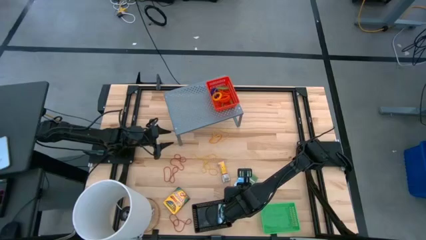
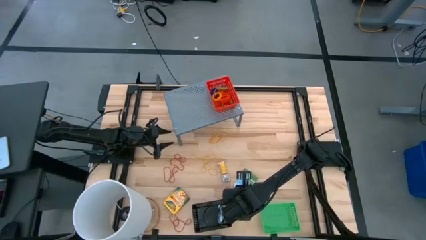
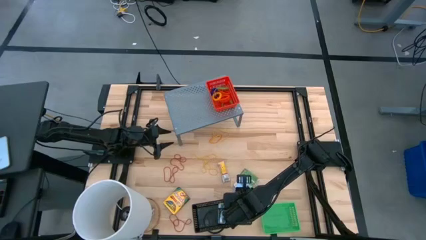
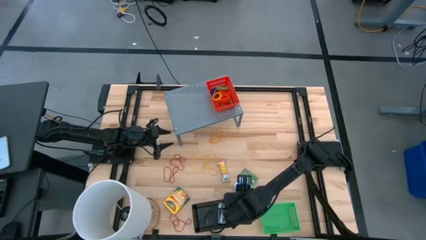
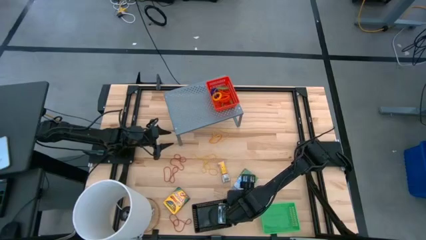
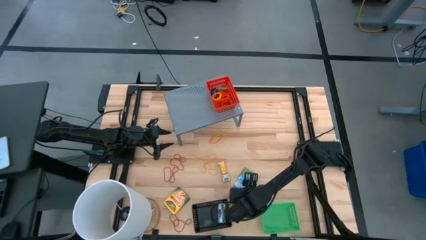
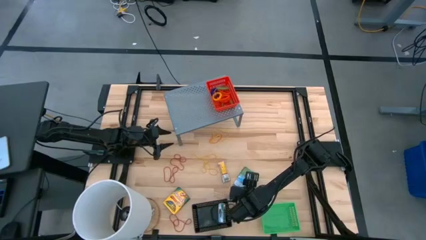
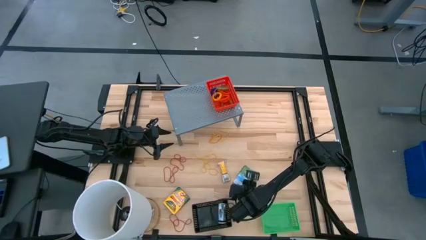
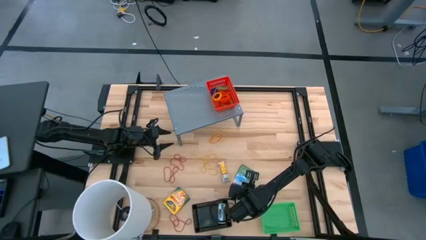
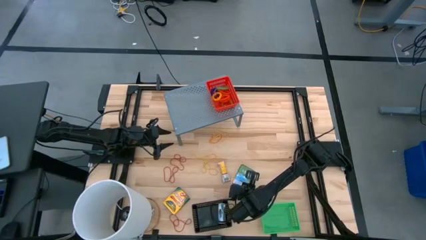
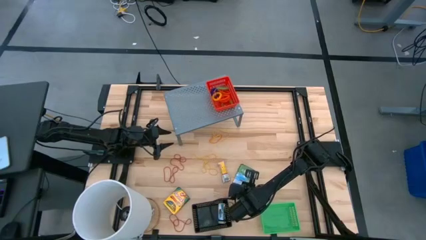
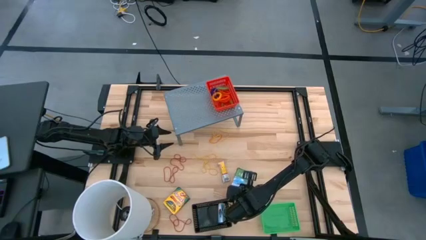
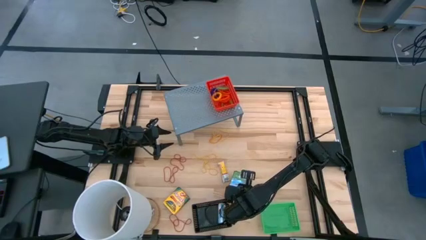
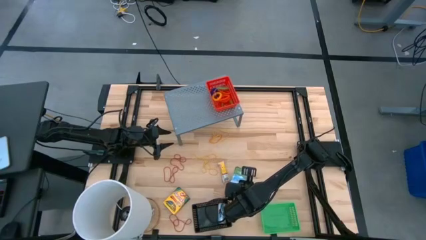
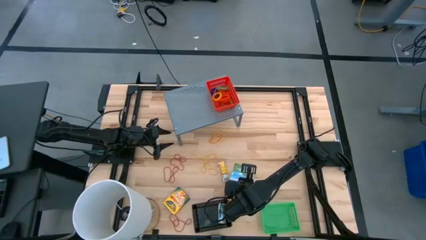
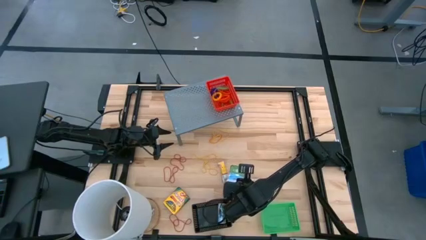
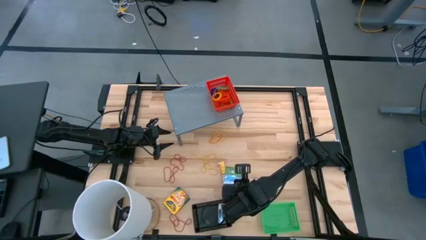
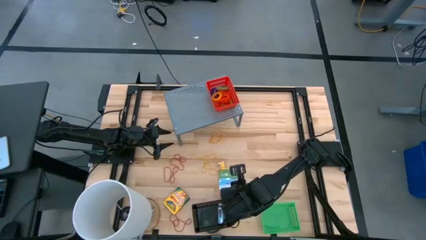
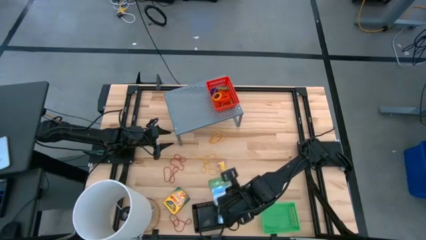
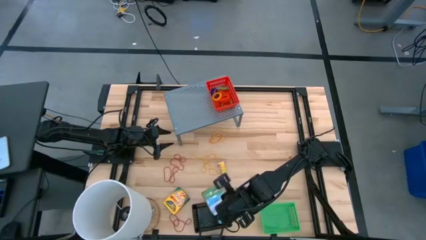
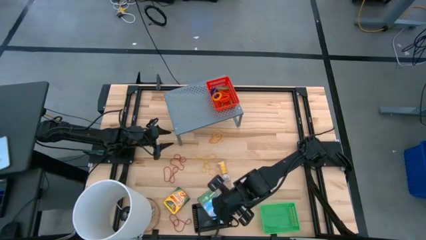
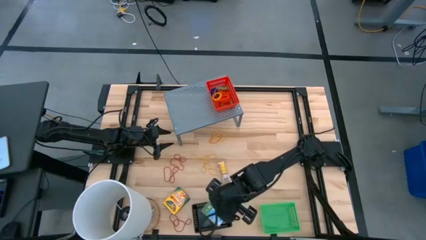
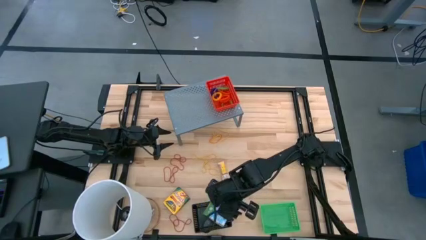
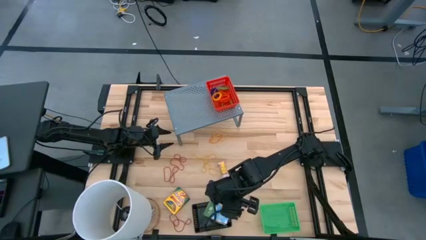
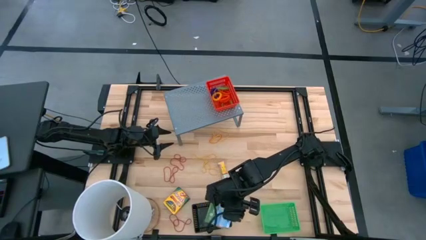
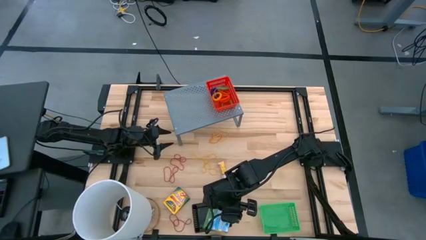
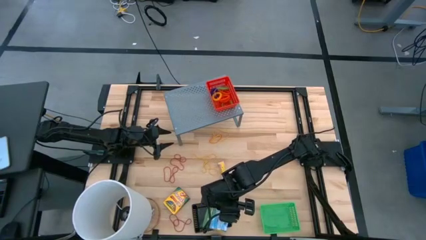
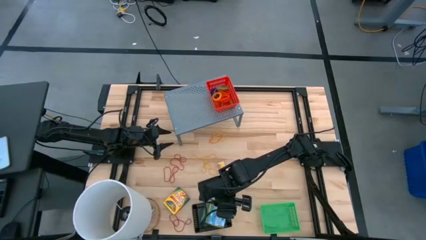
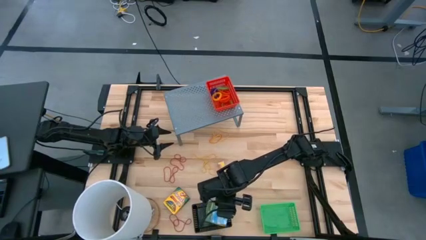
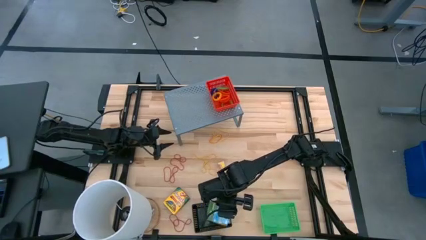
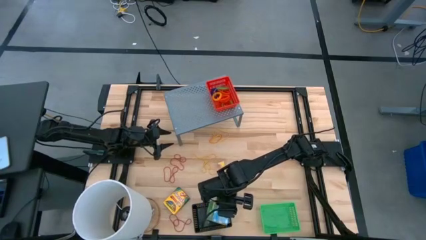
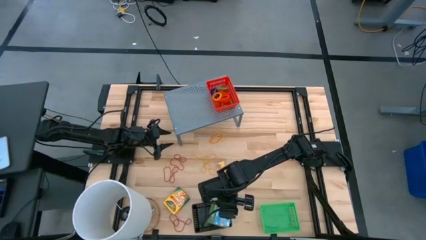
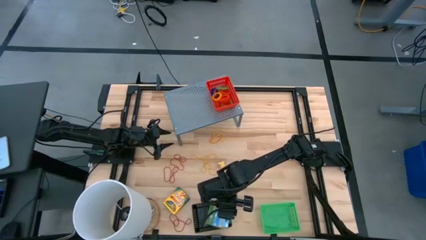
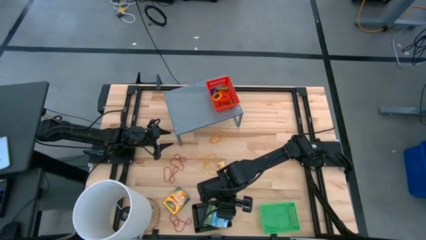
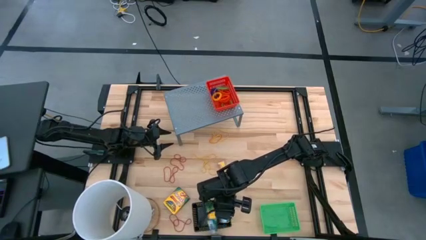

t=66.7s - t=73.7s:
Task: Pick & Place Office Desk Supplies
Put the right yellow crayon box into the black bin

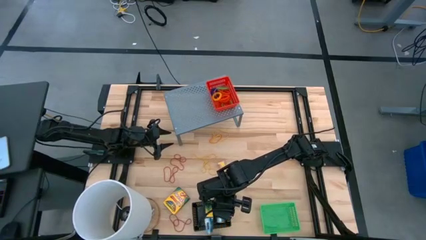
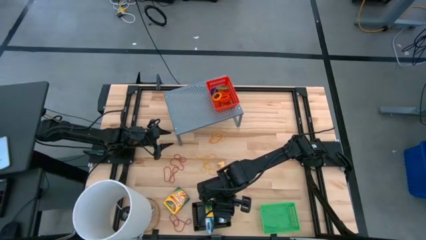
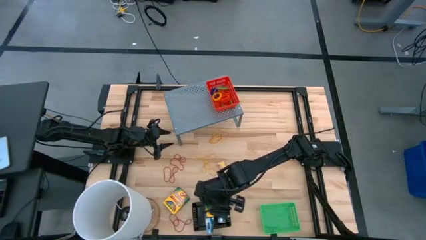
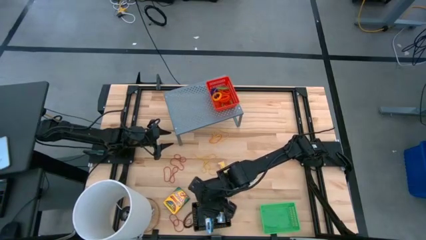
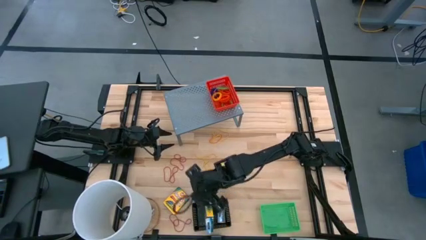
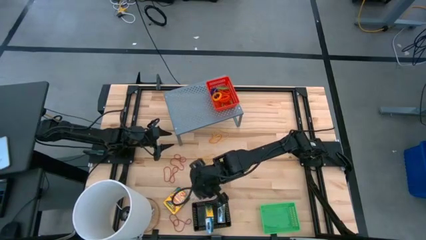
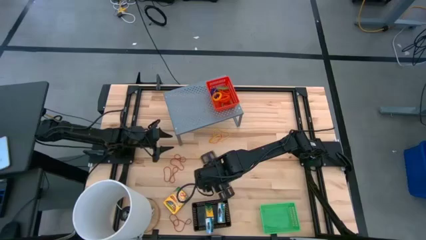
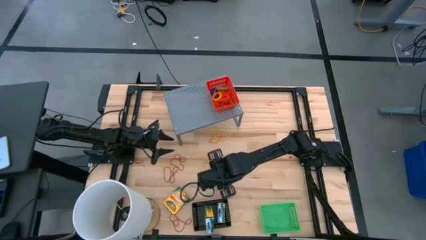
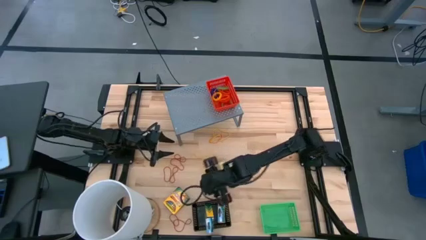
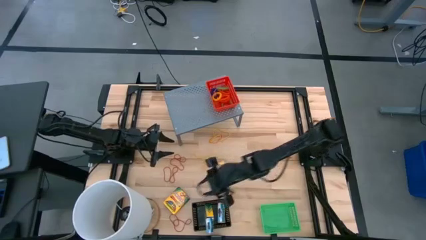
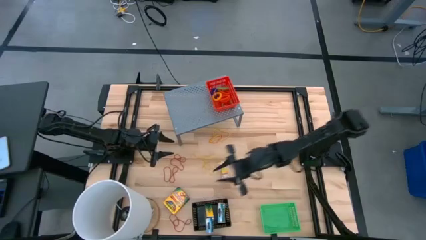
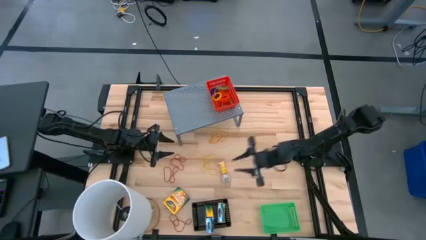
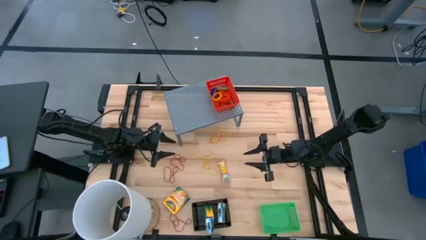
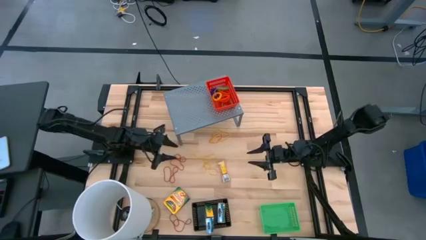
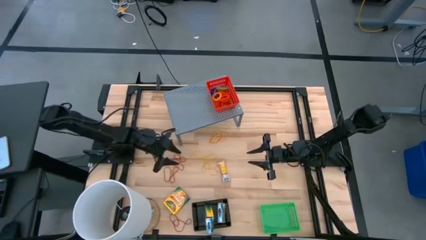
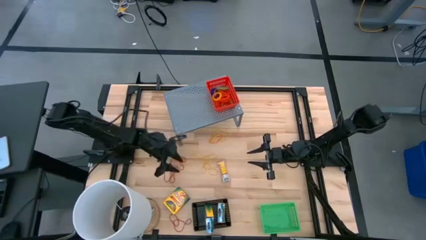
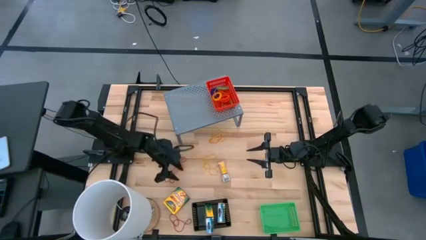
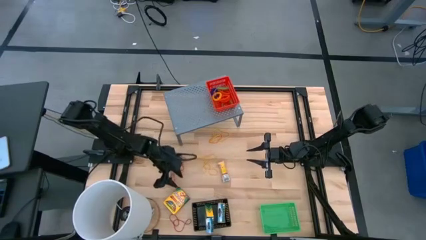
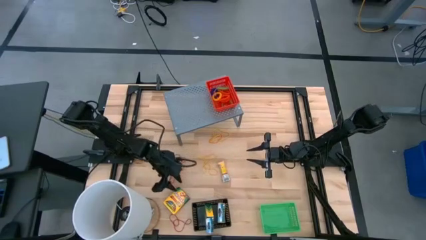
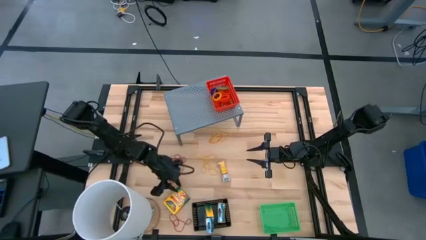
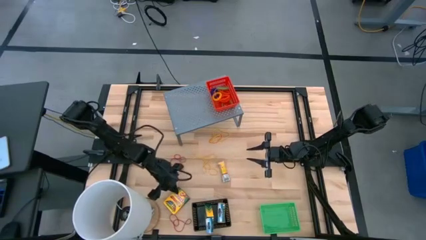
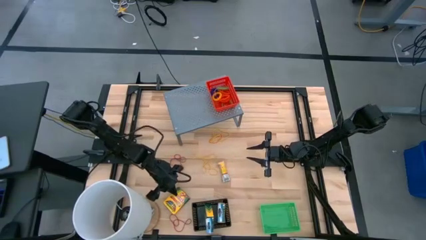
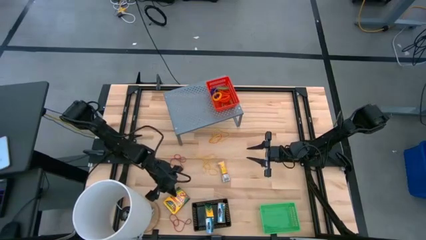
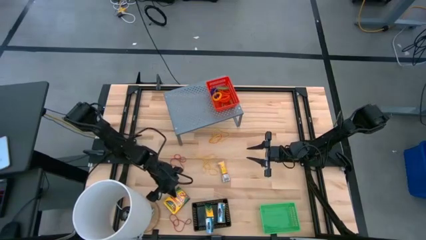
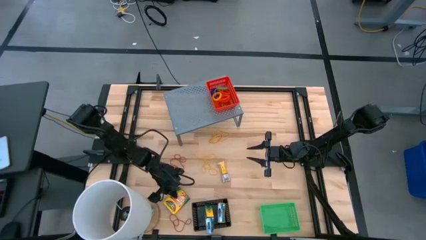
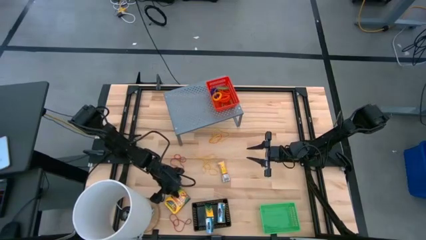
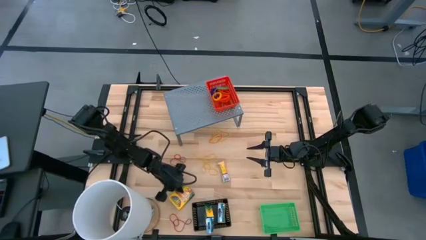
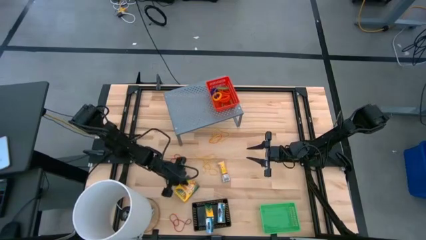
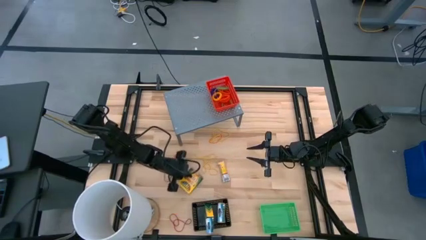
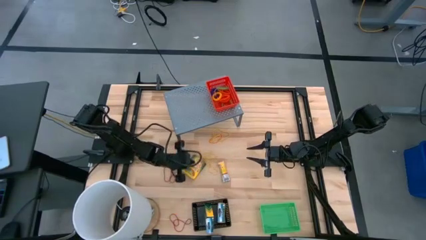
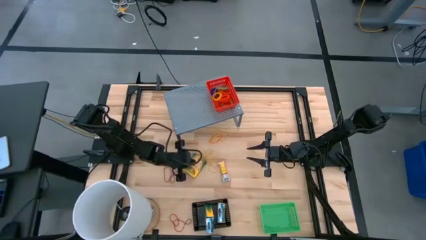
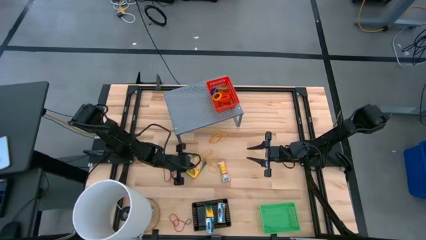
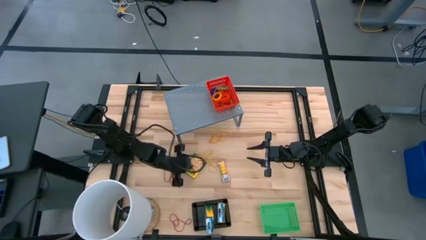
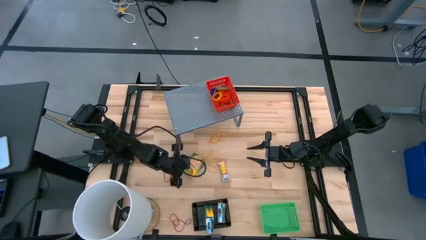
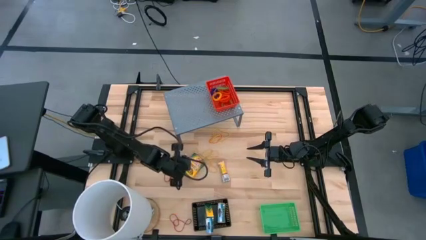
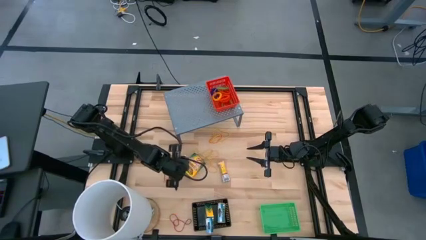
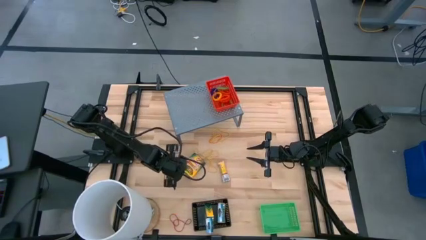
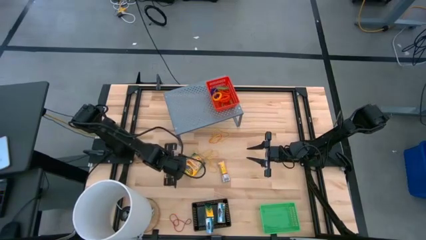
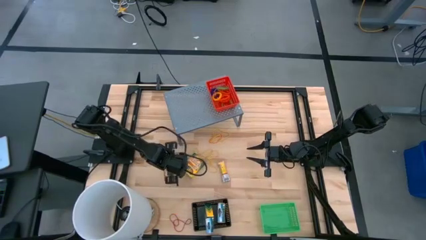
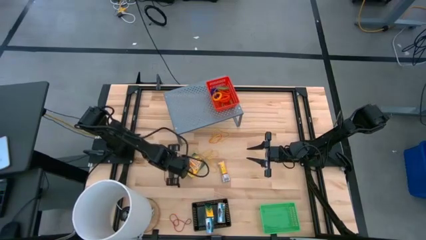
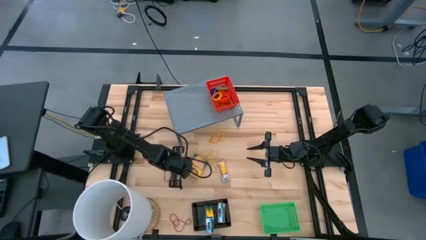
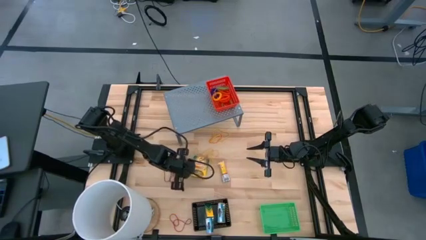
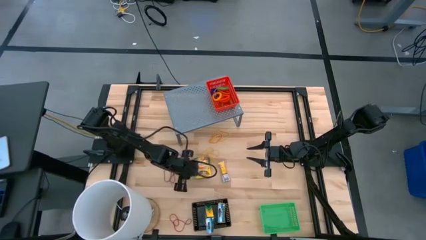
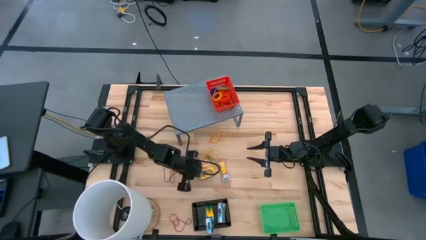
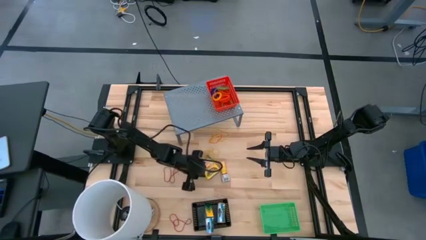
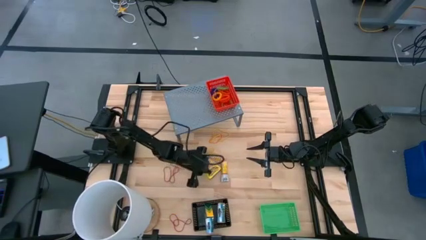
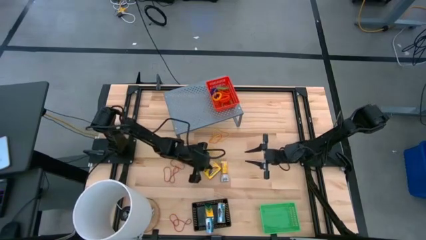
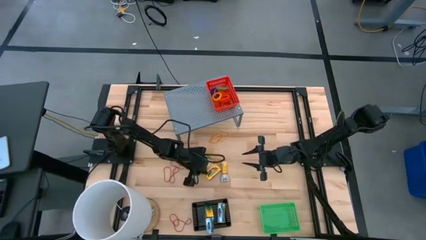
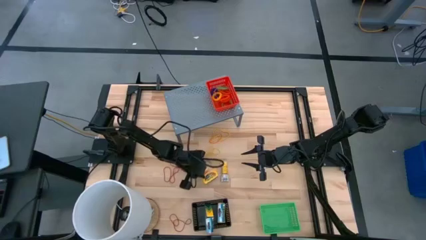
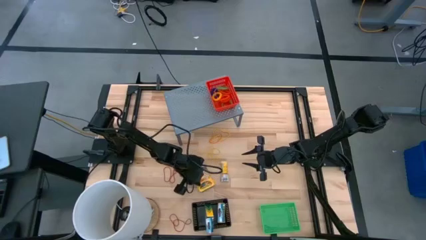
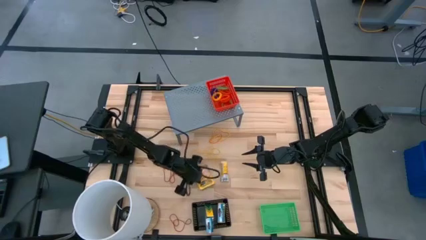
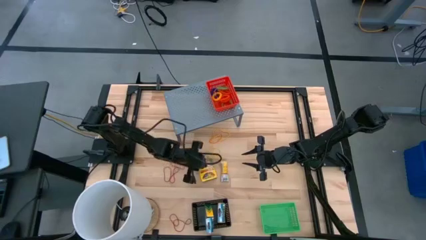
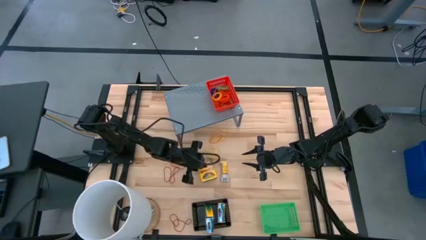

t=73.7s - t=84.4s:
Put the left yellow crayon box into the black bin

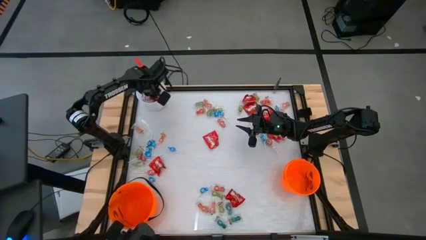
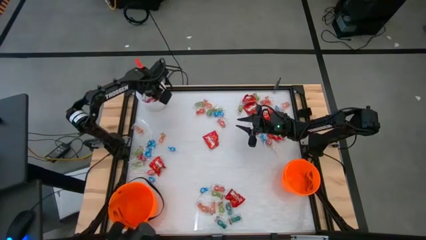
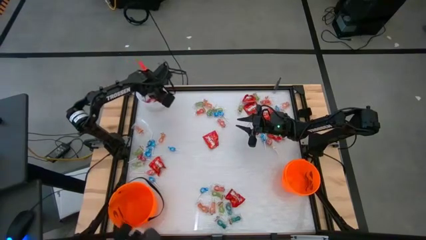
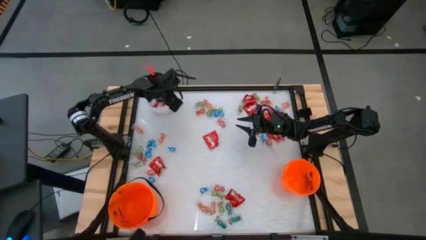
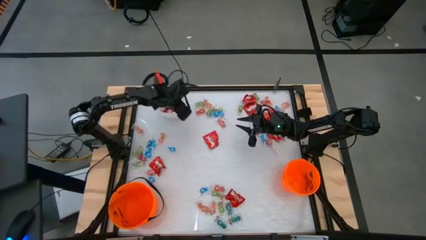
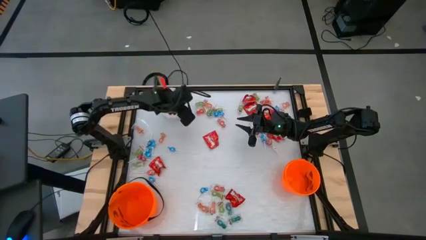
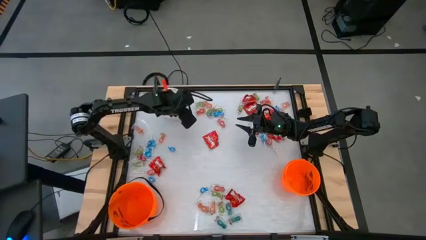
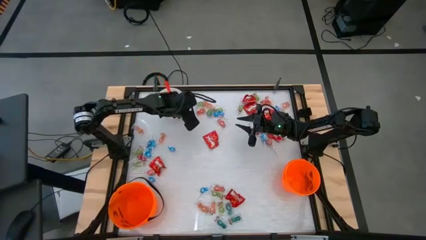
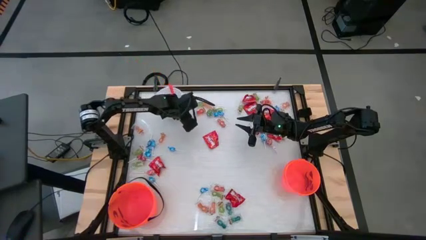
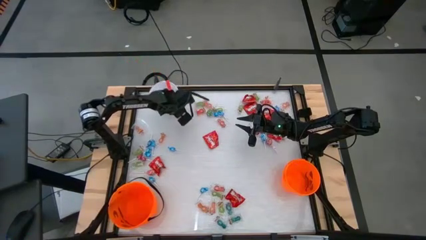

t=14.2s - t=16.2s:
Task: Sort candy by brand, put in halloween buckets
Adjust the white bucket
